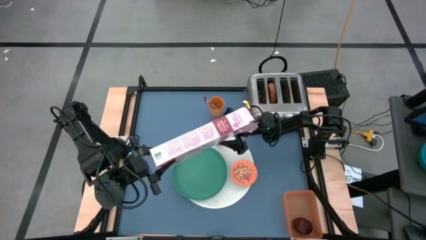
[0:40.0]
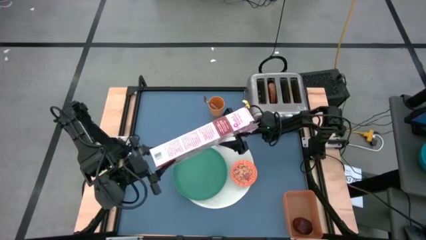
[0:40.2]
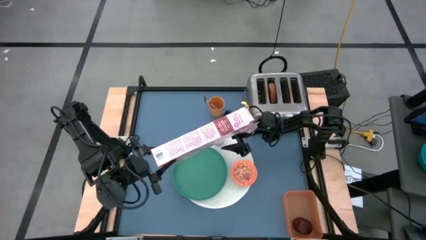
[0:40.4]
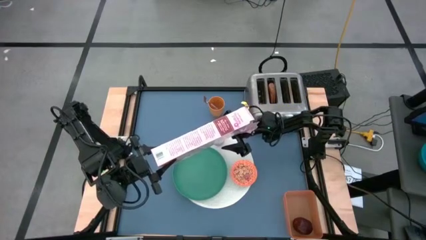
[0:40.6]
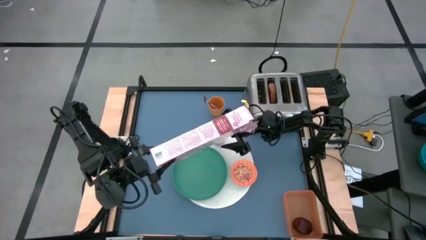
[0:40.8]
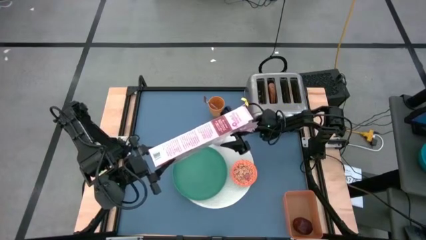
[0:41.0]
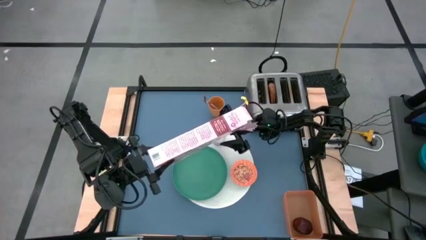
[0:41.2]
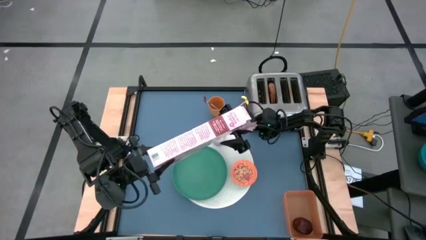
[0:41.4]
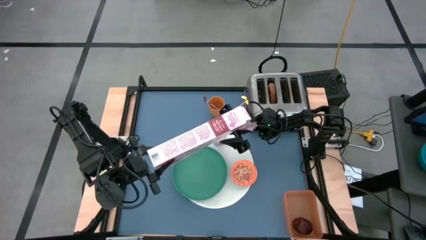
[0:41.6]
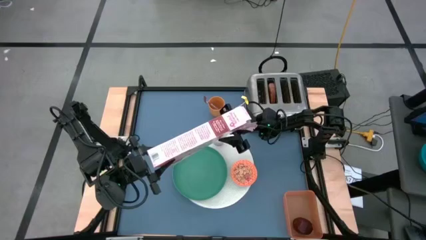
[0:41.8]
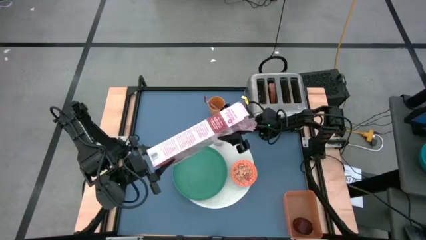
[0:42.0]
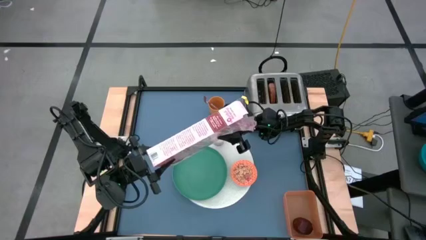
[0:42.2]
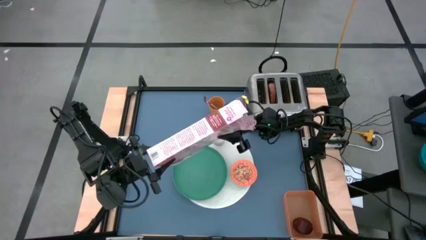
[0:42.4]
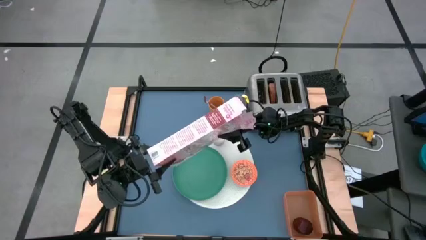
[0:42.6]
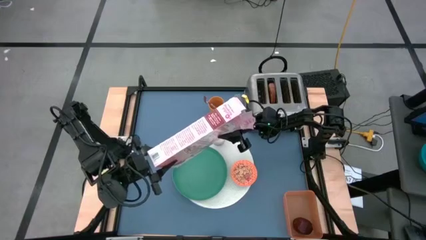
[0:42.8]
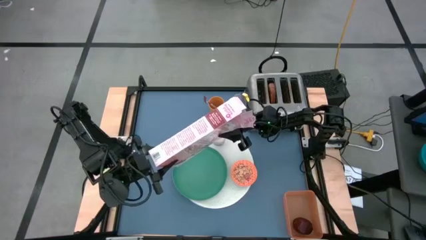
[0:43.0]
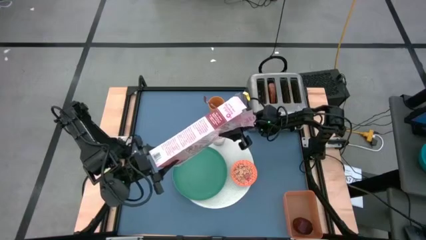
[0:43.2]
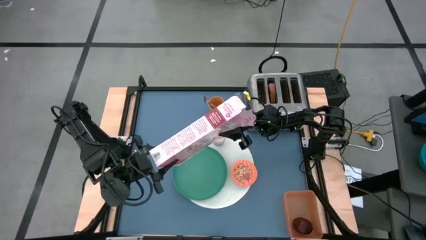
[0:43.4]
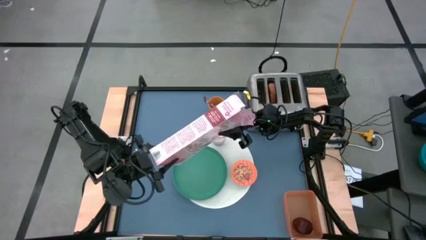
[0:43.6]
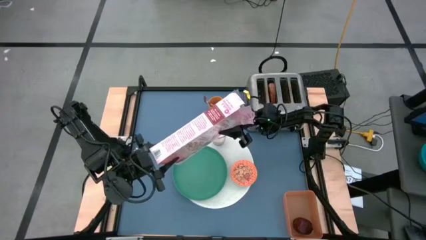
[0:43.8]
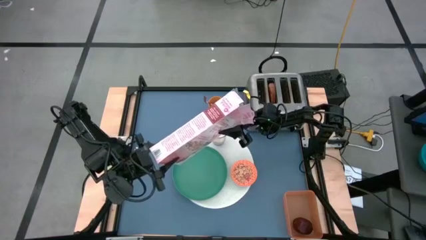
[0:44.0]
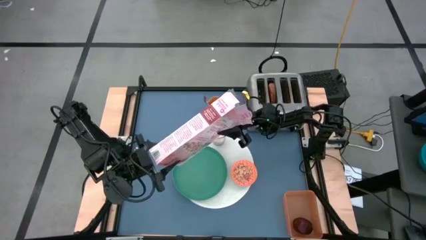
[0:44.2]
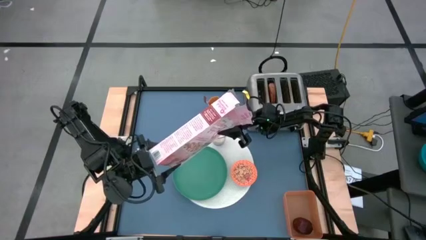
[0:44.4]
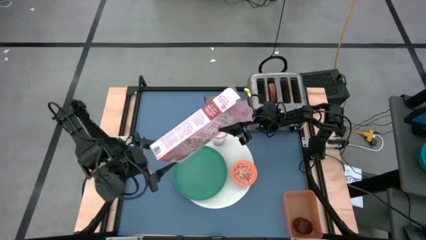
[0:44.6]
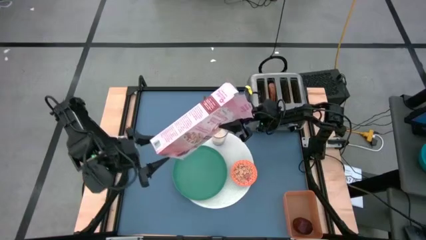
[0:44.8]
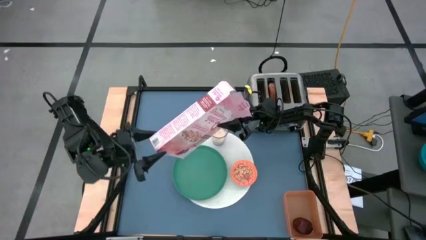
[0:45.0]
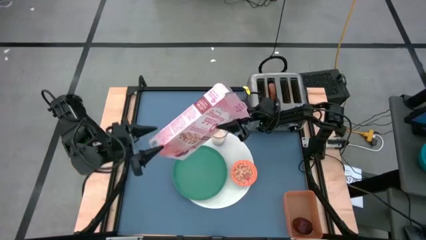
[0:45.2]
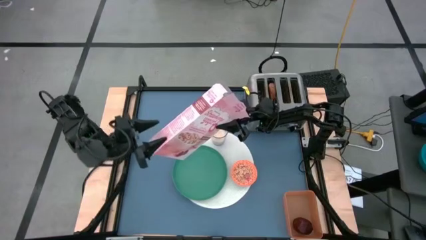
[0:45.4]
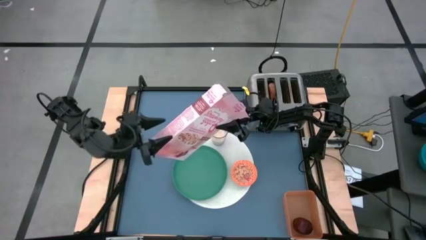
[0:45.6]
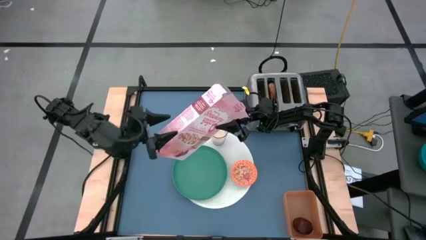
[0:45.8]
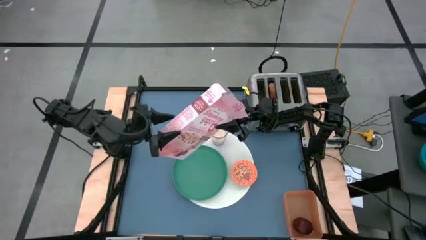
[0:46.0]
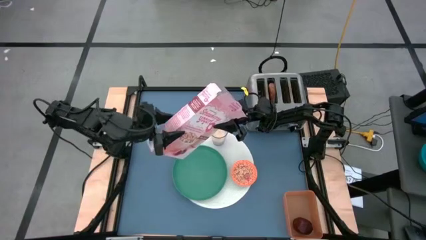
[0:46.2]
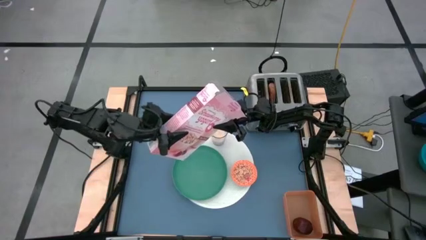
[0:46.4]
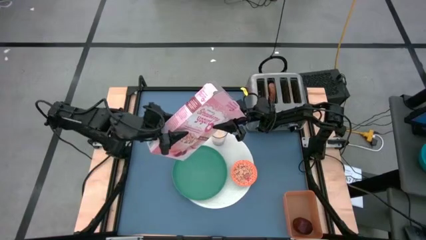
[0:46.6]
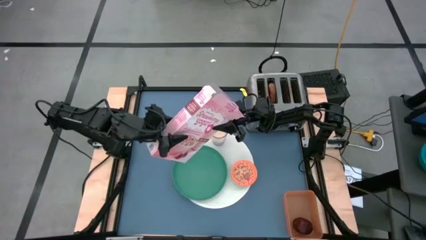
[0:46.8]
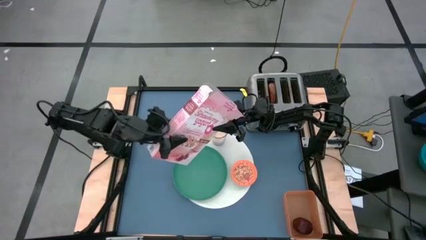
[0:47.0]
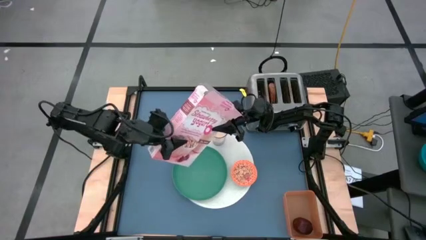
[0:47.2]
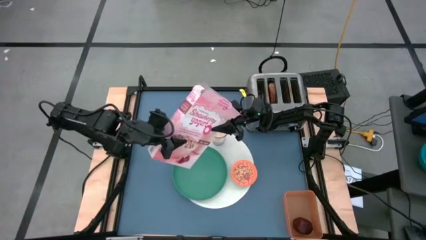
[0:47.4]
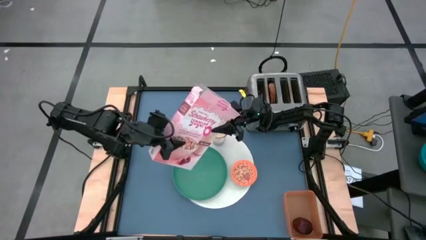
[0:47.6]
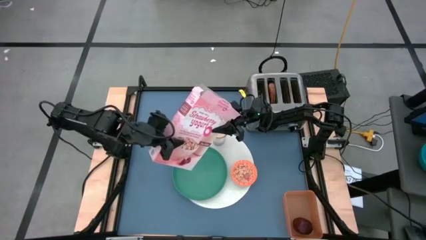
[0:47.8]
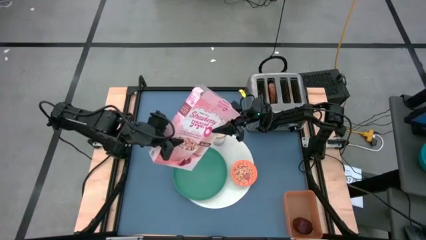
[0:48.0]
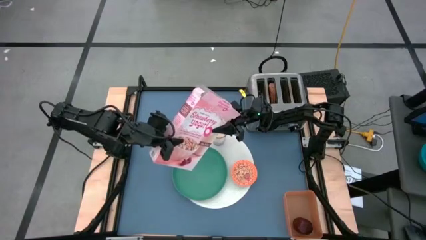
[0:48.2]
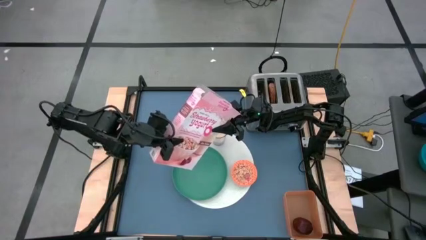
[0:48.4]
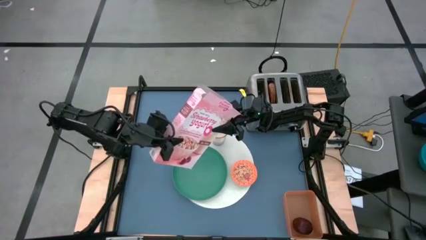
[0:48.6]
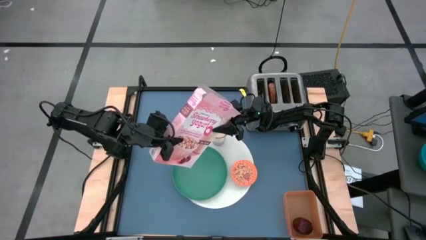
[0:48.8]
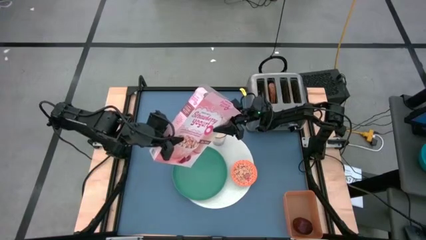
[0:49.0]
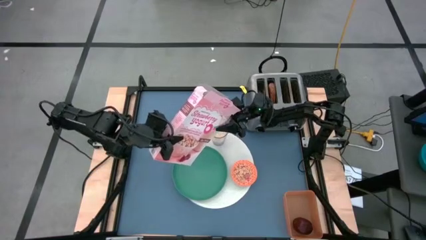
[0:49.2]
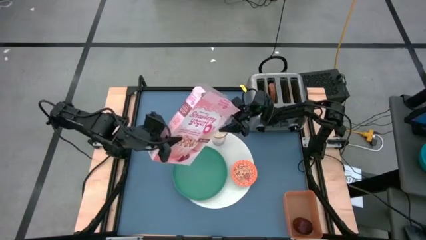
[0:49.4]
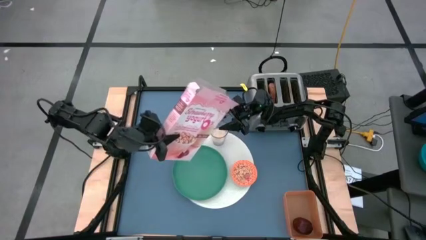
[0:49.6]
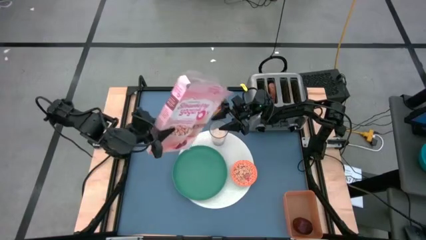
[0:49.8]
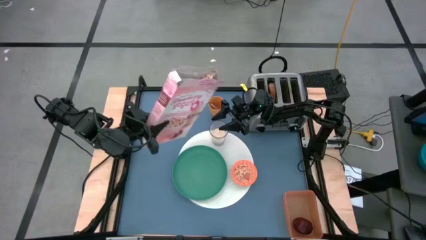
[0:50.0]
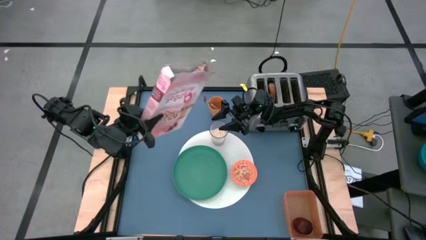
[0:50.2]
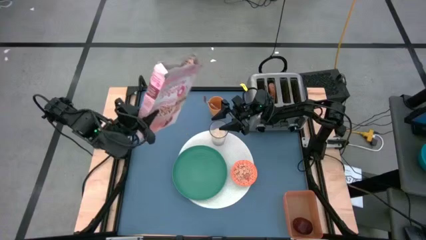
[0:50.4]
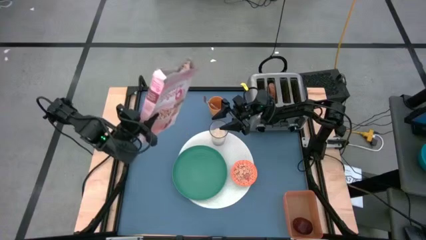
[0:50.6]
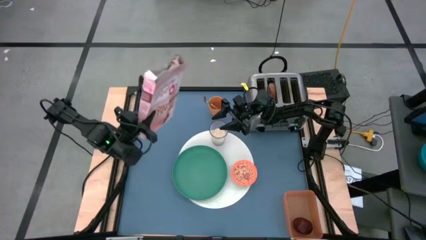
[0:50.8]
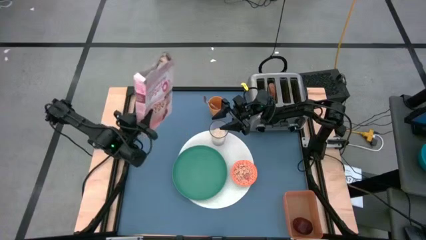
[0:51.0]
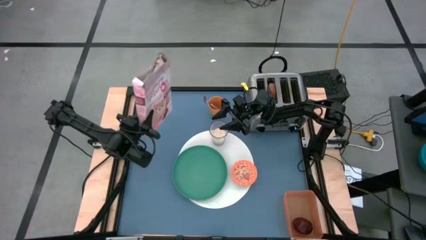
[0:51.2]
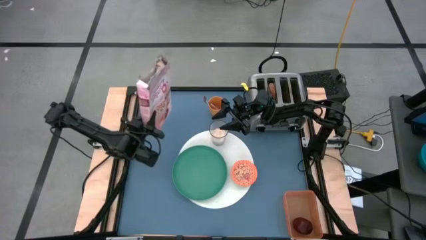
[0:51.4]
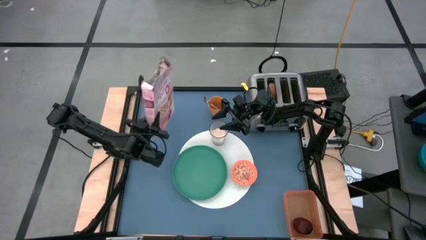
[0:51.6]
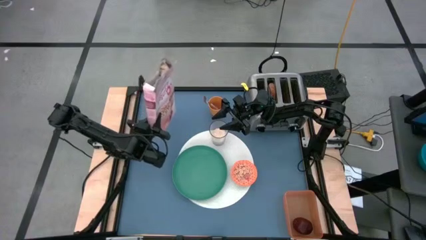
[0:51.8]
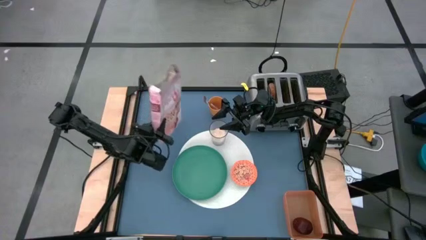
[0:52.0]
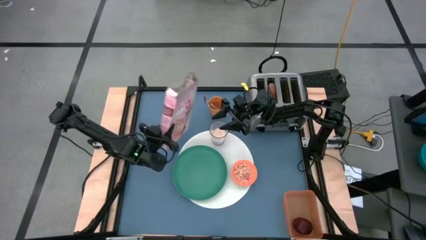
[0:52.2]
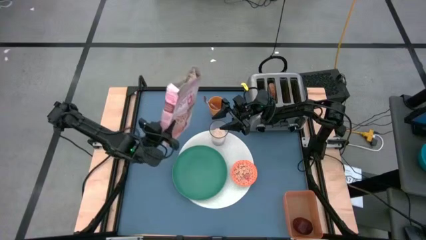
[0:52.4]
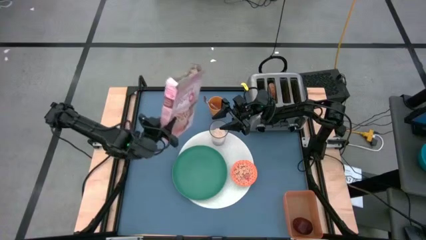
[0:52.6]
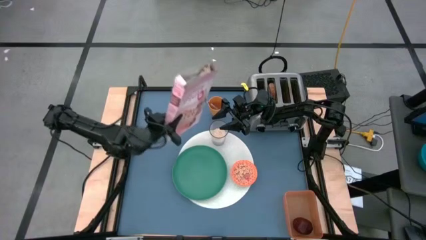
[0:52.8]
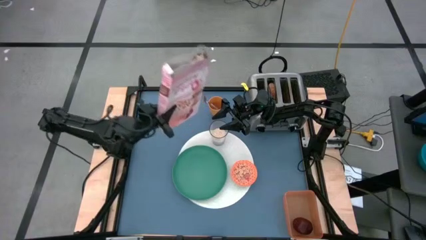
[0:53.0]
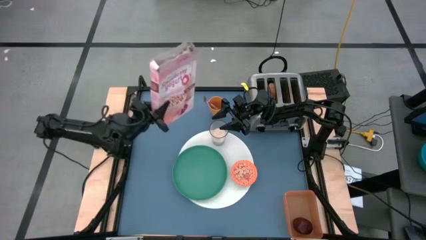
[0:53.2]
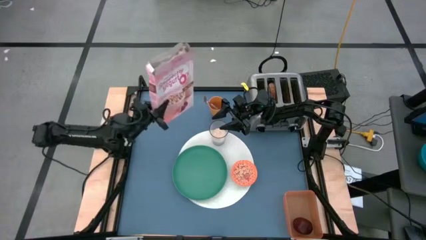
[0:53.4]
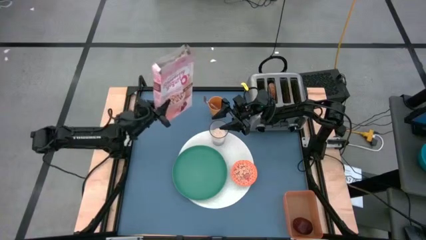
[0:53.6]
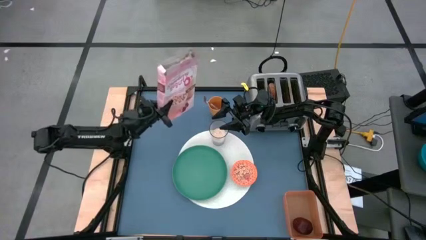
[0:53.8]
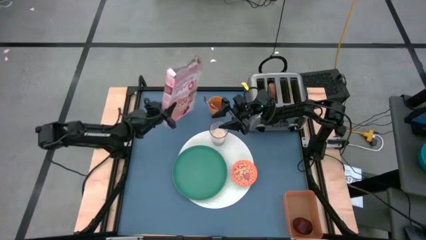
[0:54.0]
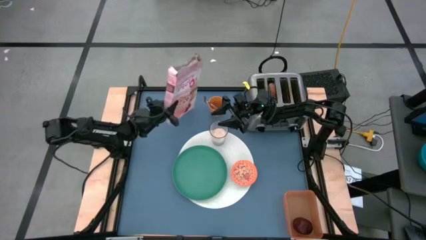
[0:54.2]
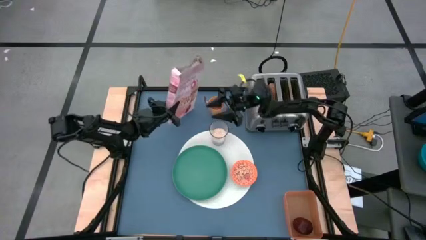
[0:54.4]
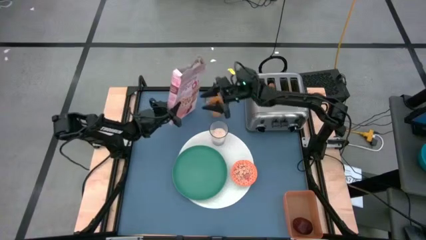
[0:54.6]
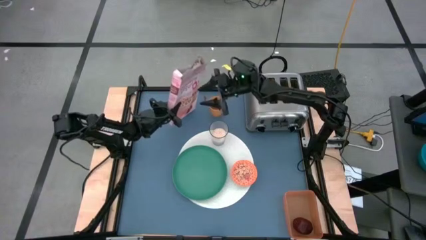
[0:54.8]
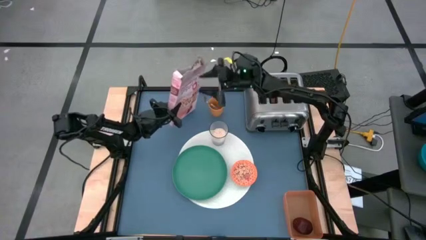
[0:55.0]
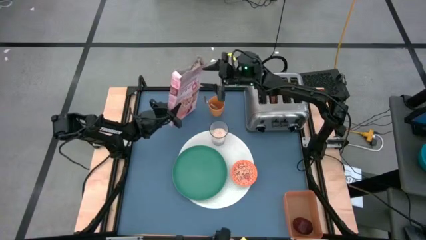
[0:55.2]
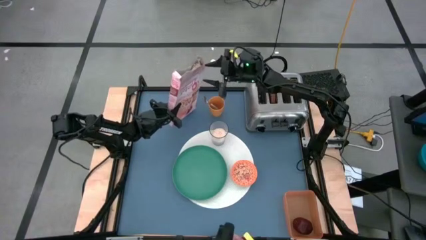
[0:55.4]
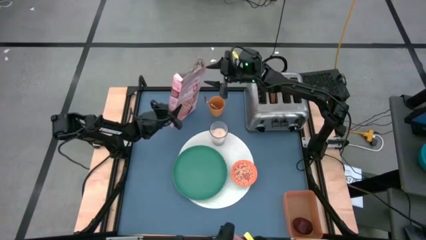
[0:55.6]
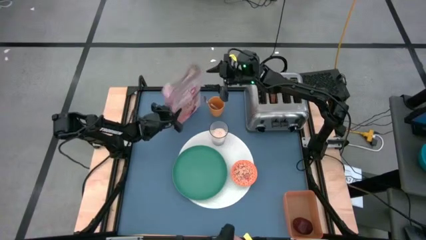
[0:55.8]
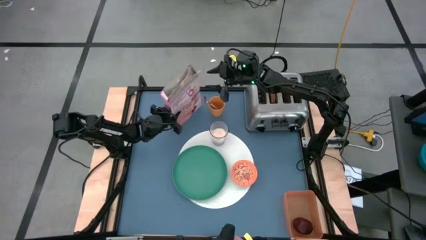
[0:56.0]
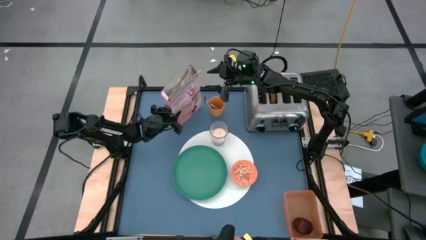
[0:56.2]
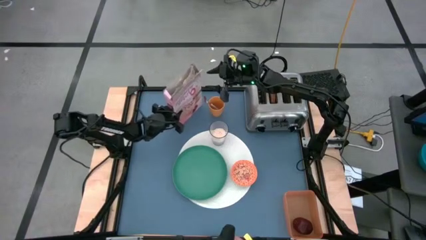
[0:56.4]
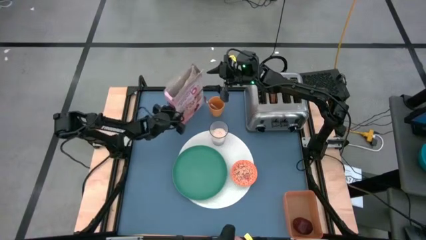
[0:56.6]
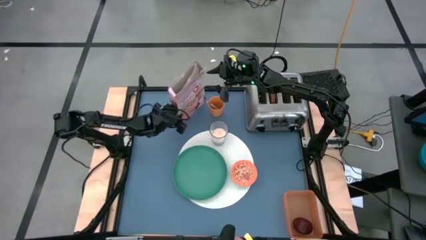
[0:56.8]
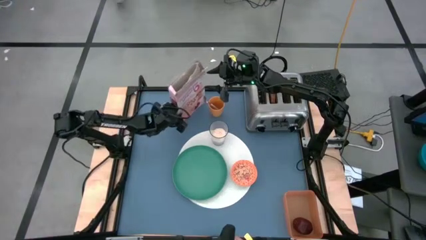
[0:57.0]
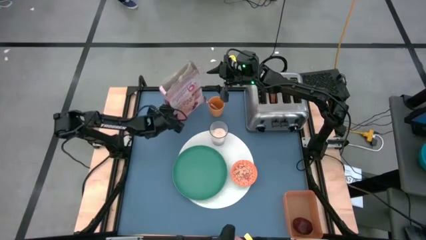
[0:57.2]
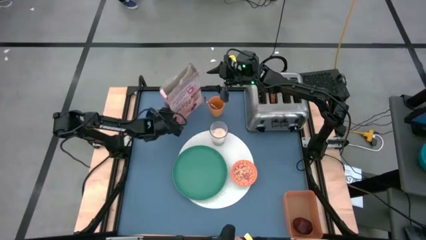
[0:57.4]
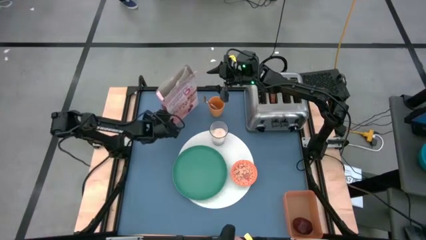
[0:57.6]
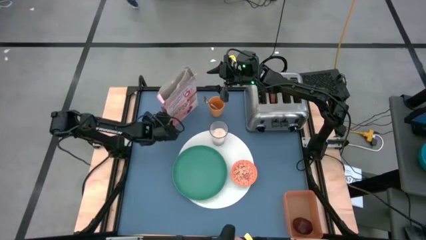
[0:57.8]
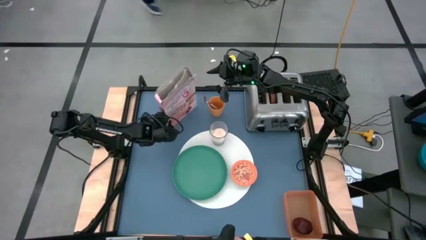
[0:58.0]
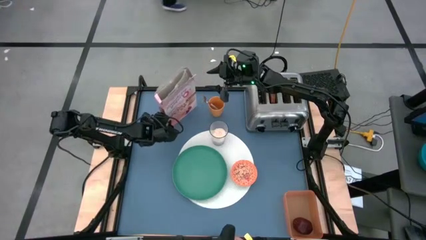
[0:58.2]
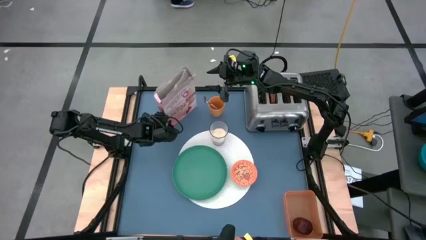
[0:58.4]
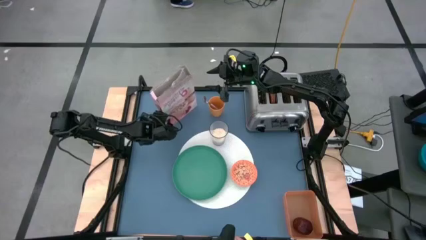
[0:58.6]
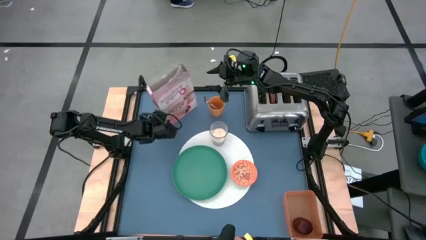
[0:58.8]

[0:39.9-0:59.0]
Task: Arrange a breakfast setting
Pour the cereal from the cereal box into the orange bowl
